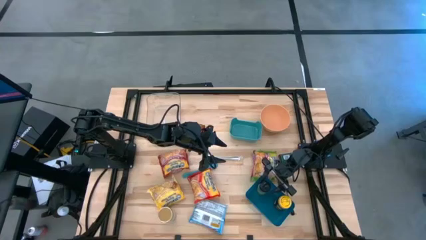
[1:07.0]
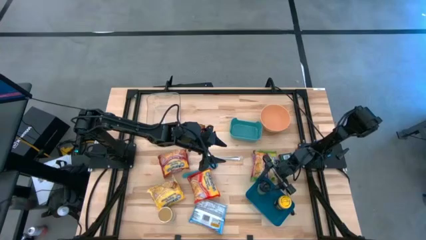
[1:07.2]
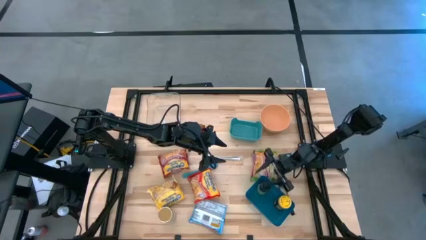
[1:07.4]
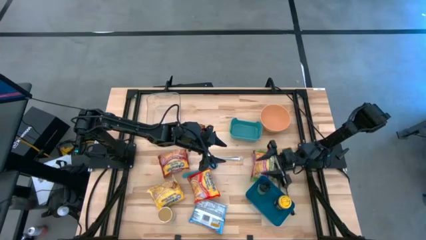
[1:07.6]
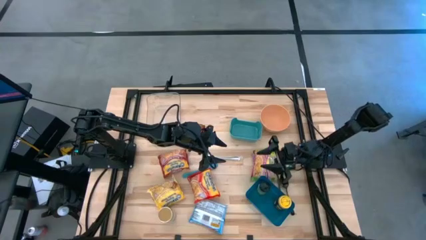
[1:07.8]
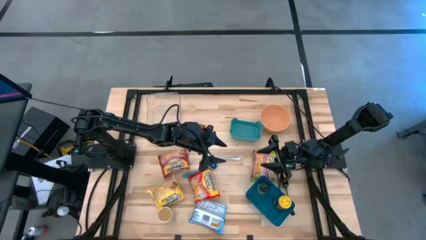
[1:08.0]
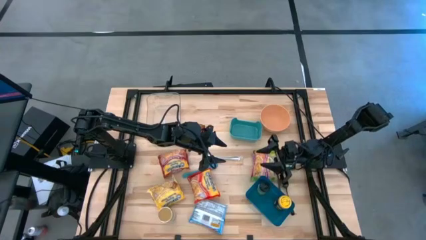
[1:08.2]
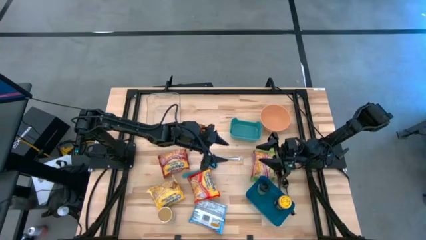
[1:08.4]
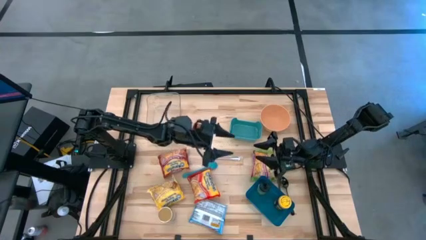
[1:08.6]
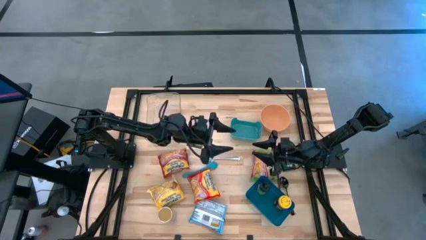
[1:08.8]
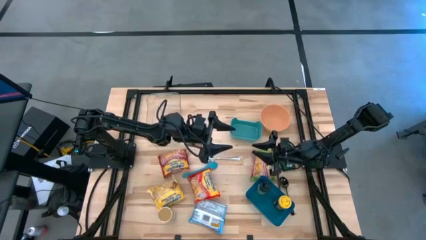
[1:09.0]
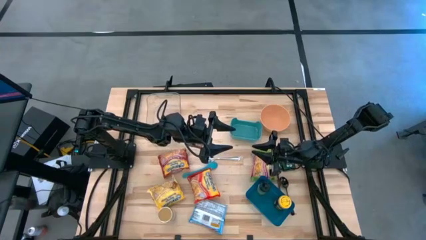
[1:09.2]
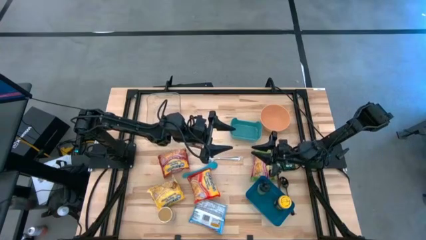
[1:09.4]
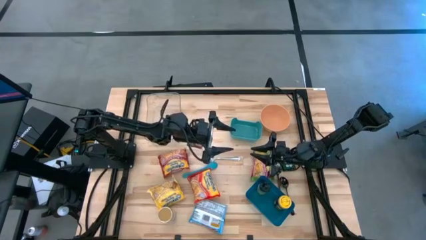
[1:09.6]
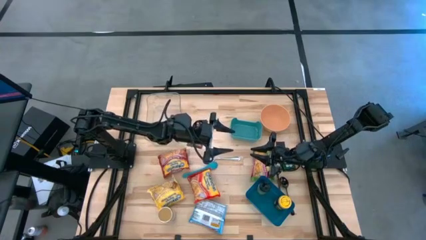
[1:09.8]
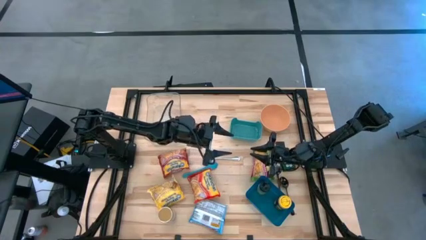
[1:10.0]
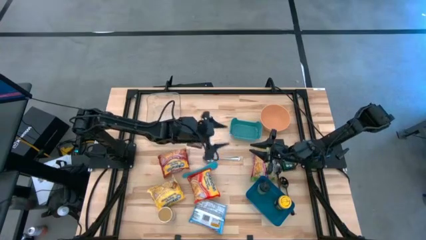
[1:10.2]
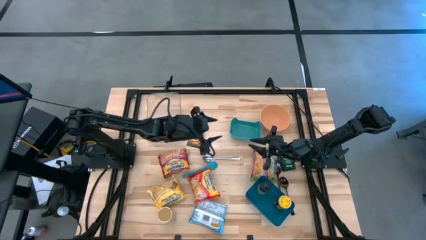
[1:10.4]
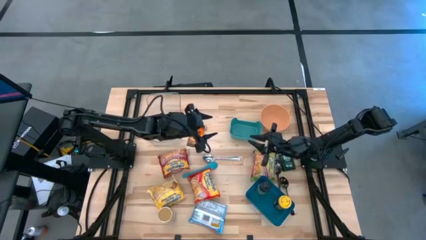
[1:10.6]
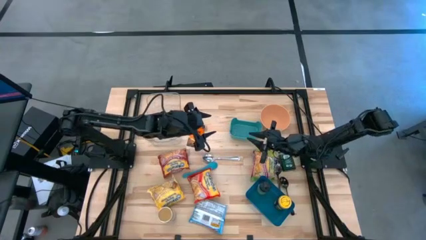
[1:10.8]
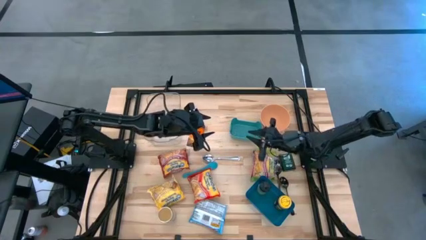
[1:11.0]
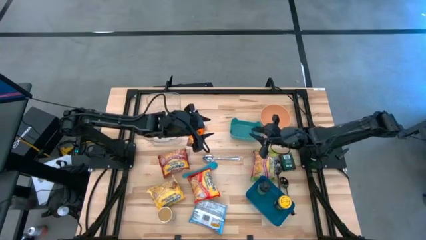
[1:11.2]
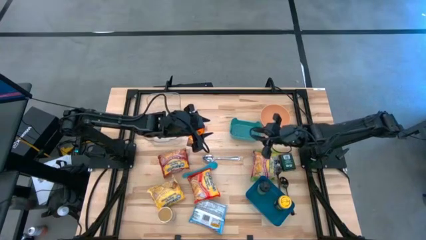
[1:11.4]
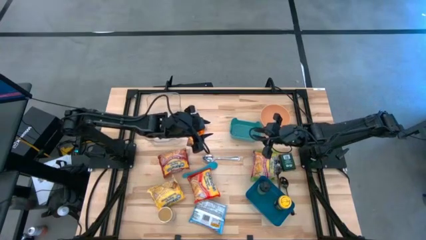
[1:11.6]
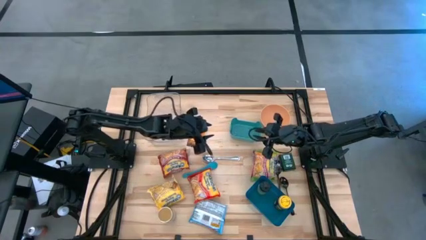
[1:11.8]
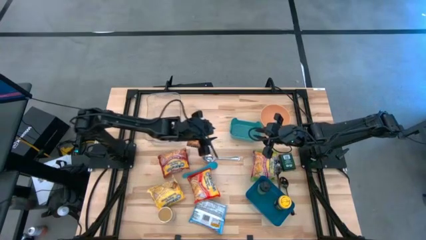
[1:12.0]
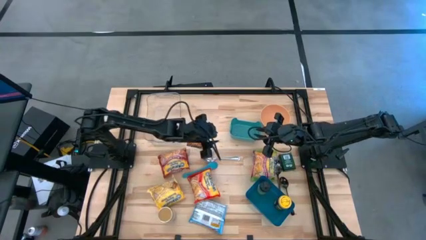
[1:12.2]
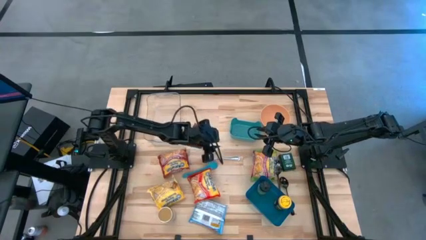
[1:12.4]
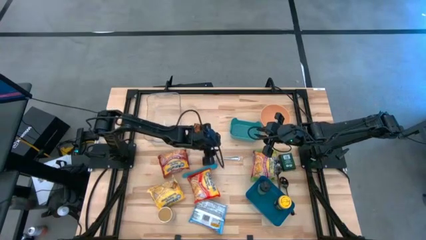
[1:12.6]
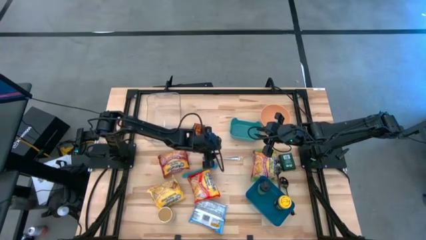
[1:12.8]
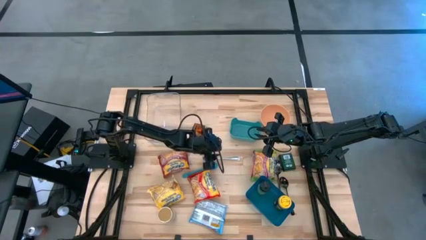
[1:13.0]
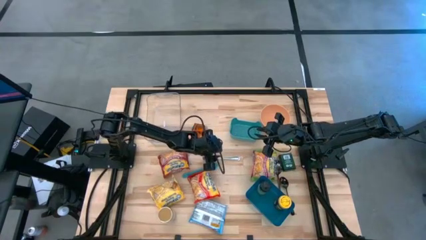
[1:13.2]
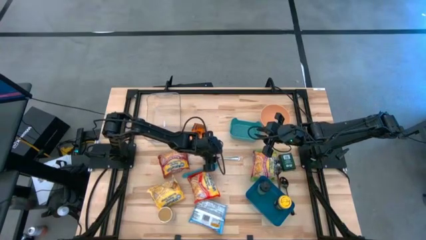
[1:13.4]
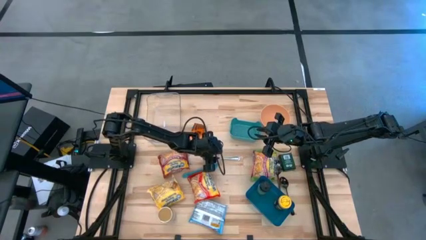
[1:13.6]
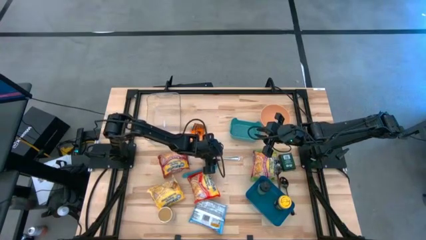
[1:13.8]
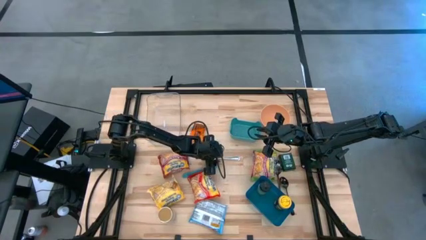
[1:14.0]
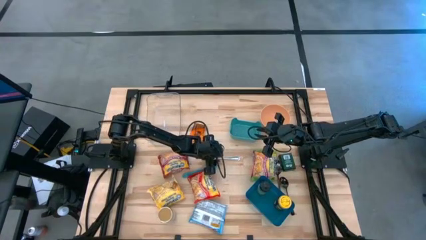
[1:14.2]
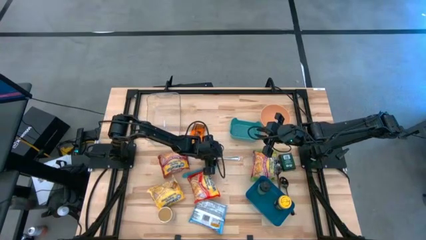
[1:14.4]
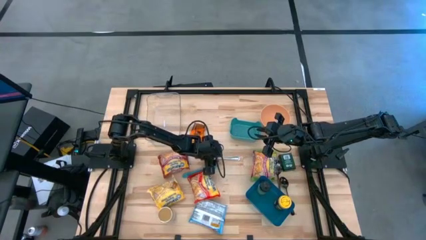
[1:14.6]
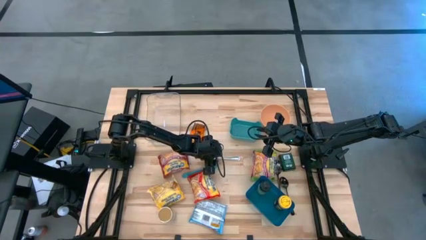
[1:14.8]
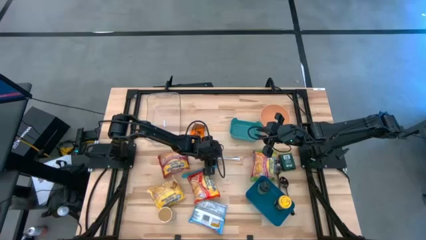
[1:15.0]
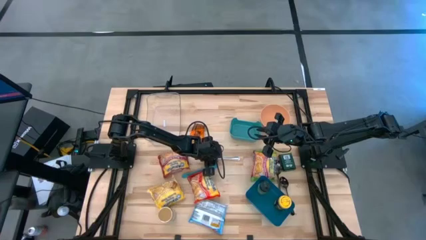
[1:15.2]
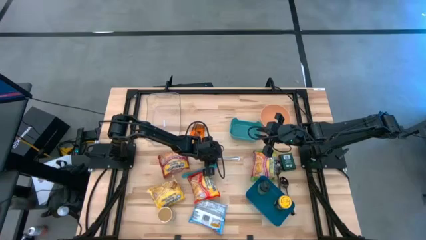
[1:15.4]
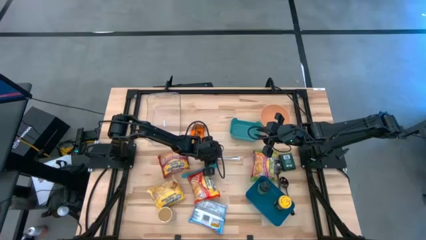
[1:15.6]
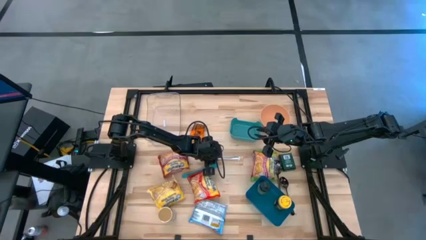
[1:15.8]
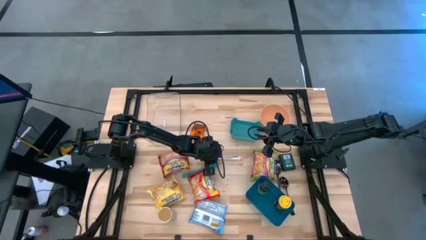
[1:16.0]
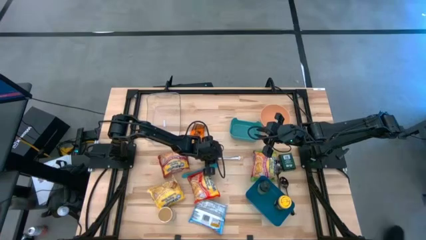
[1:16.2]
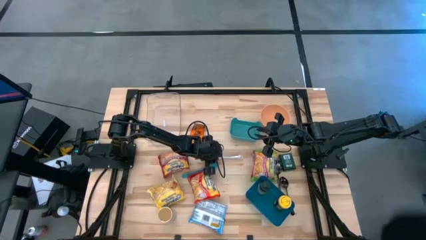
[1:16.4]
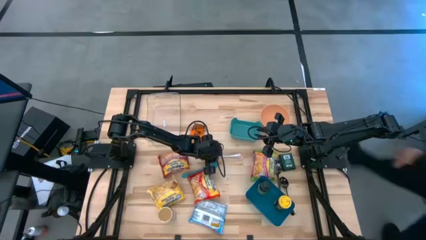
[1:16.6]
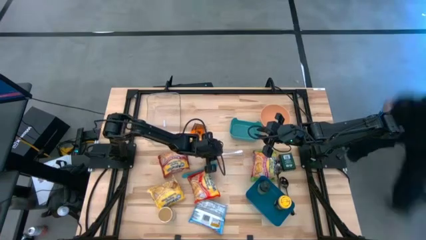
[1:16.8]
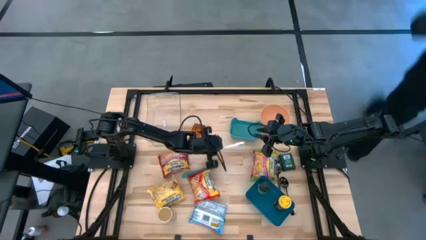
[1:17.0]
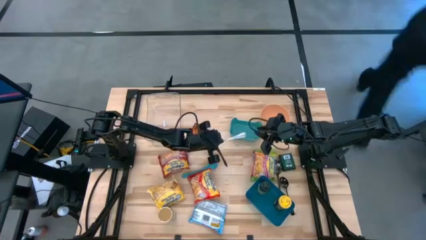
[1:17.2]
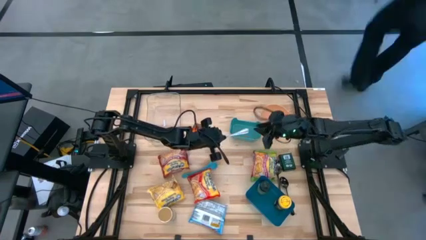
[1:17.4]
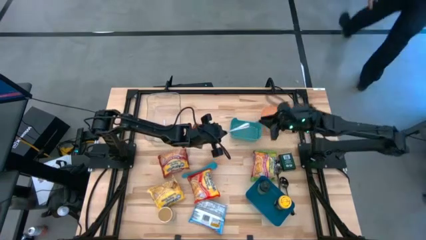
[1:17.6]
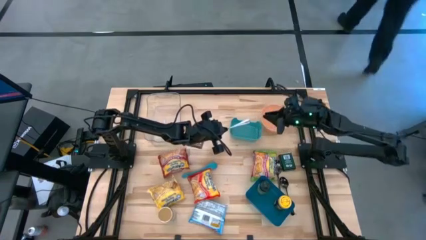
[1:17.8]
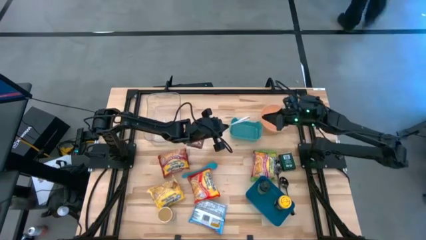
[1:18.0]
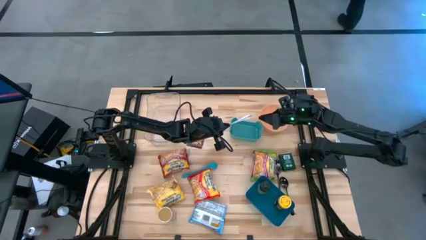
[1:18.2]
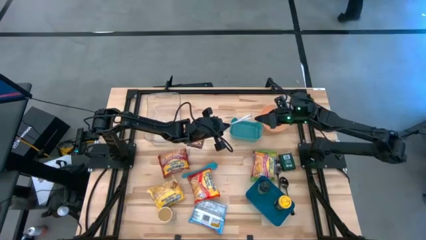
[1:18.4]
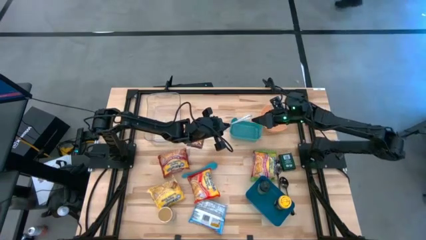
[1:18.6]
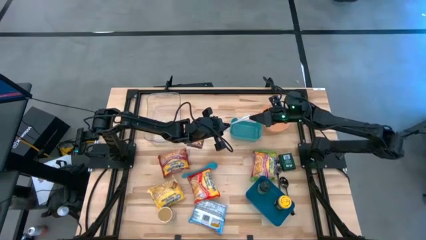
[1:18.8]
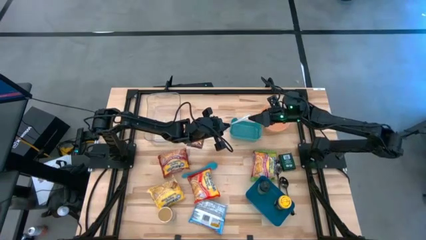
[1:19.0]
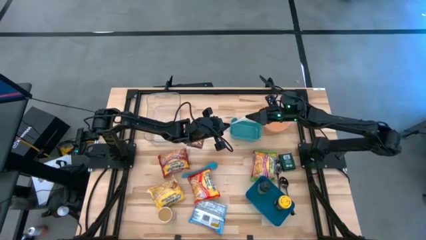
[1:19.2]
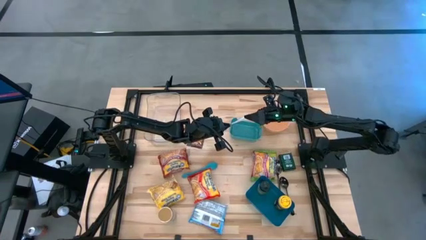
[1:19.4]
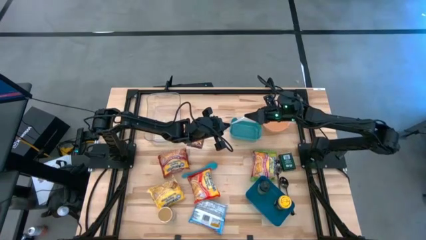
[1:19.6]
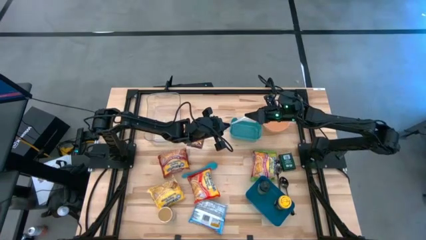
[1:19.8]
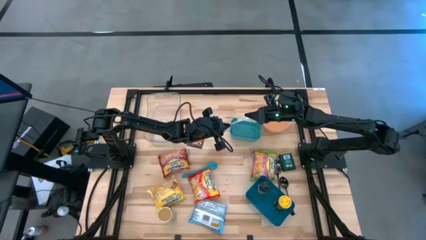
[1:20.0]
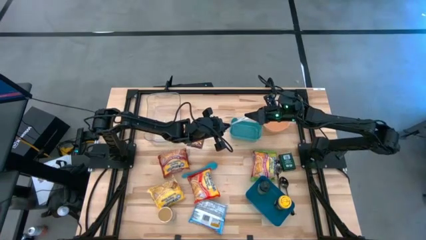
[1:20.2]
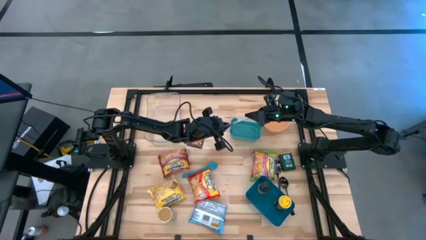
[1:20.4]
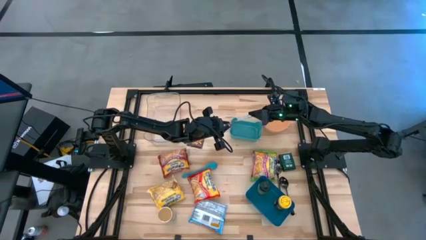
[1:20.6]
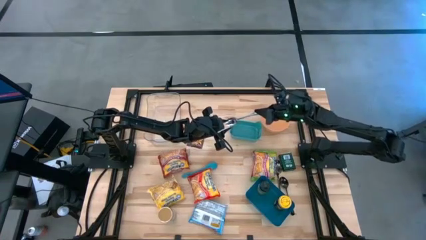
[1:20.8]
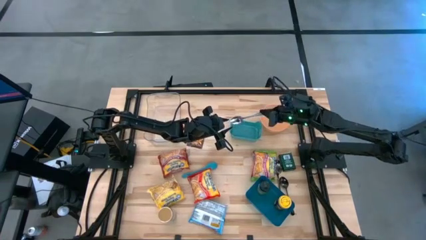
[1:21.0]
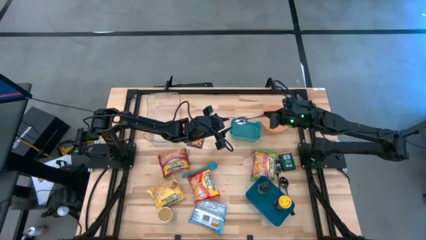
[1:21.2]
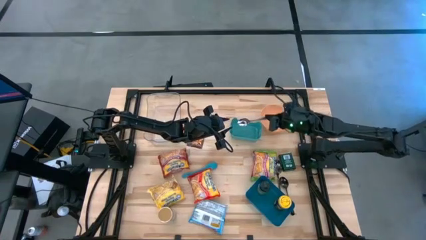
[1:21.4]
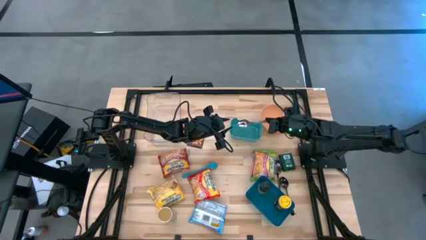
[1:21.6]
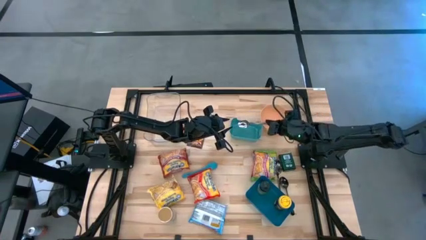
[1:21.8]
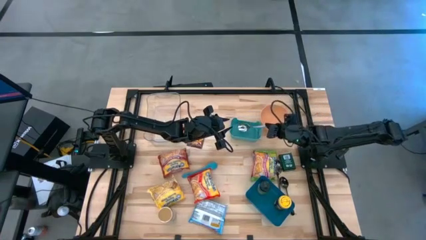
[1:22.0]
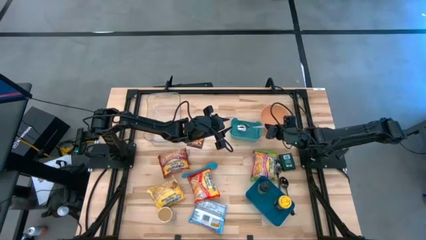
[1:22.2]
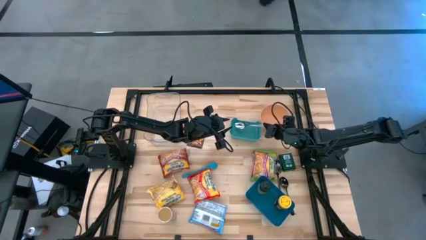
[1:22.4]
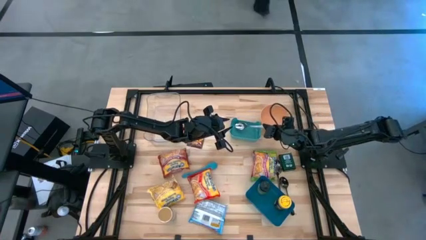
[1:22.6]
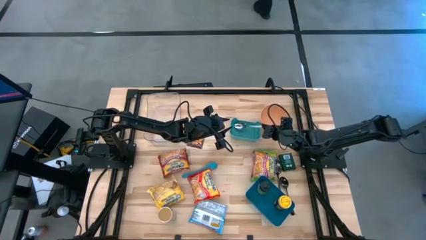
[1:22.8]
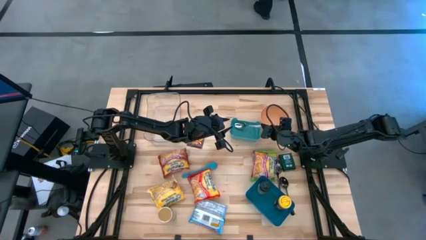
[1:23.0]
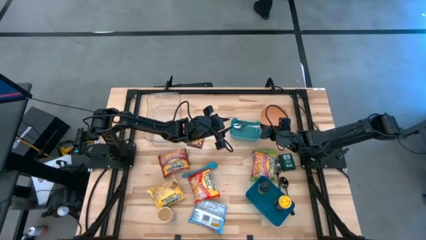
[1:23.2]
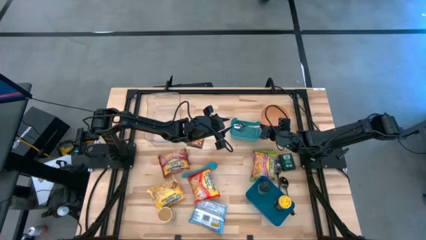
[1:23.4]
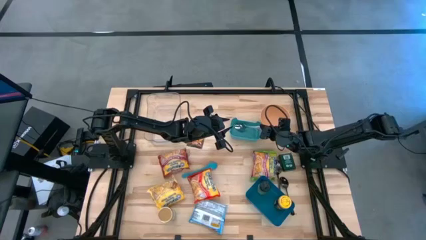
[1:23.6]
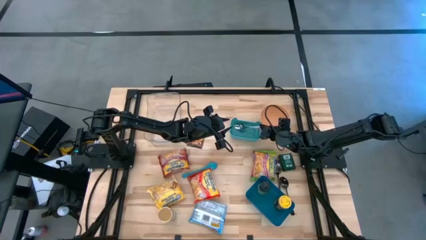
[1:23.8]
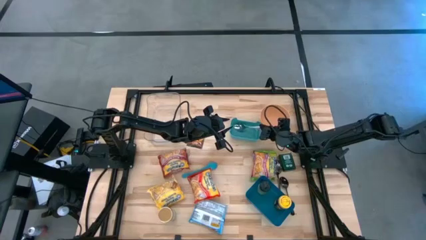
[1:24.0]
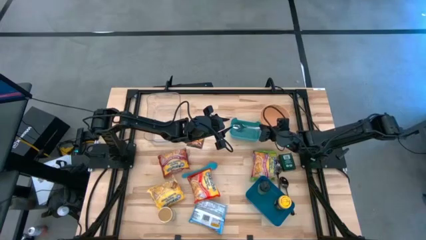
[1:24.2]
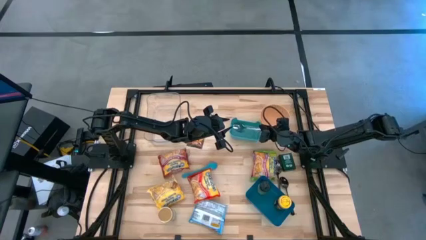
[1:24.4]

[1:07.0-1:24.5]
Task: Pick & Place Food Item
Put the silver spoon into the green bin
